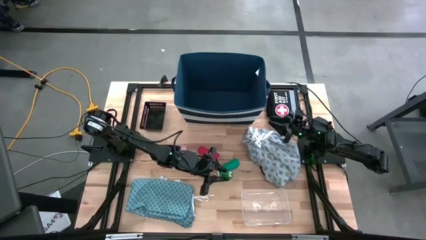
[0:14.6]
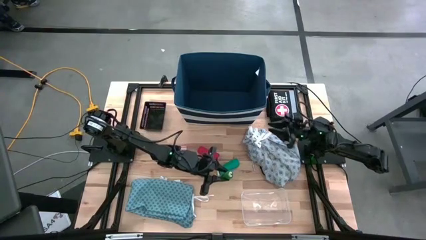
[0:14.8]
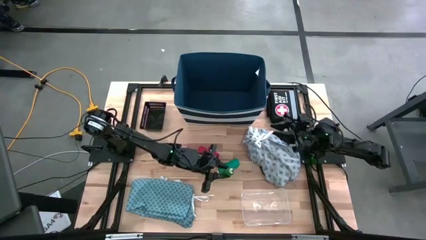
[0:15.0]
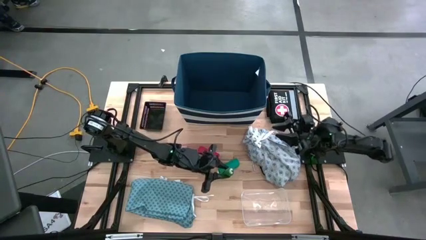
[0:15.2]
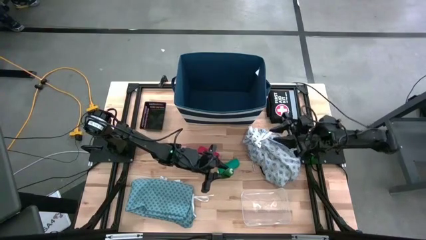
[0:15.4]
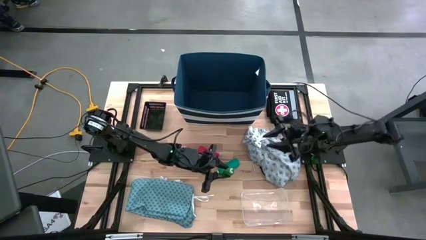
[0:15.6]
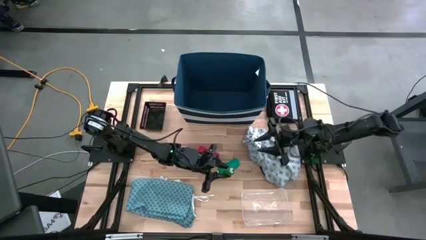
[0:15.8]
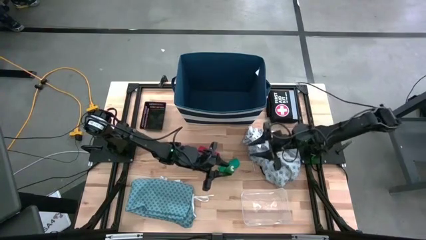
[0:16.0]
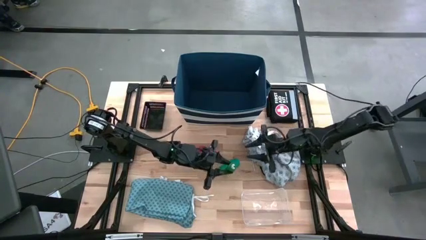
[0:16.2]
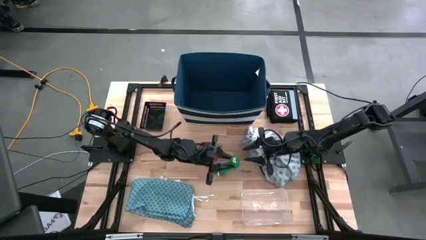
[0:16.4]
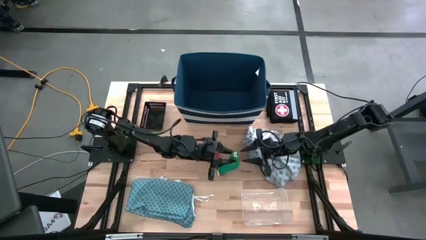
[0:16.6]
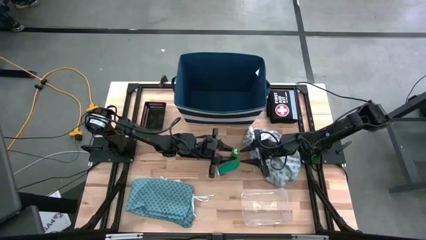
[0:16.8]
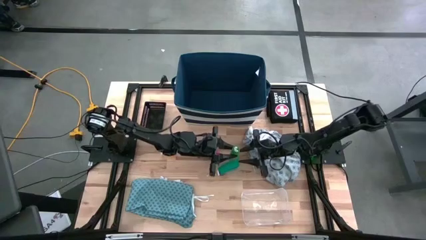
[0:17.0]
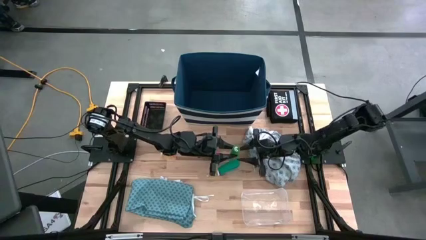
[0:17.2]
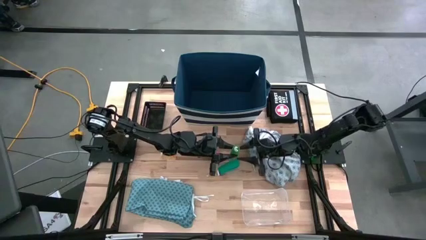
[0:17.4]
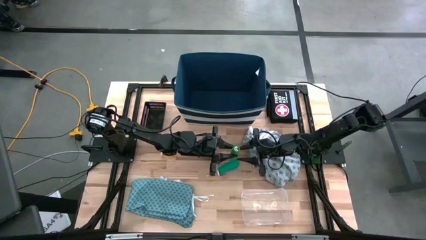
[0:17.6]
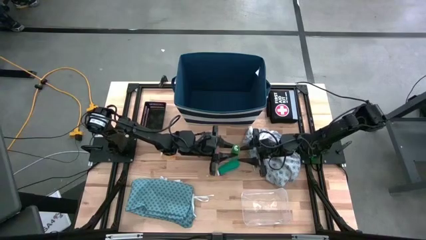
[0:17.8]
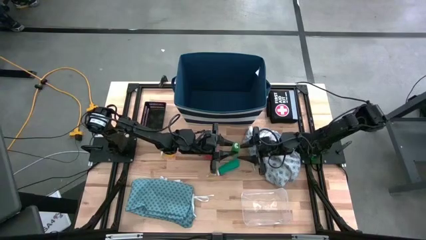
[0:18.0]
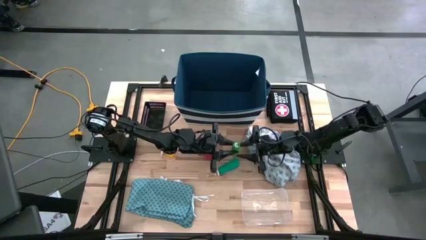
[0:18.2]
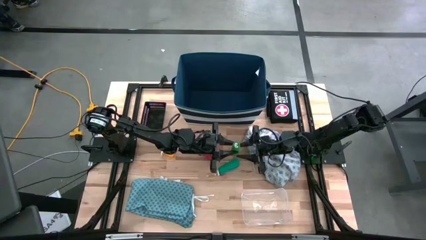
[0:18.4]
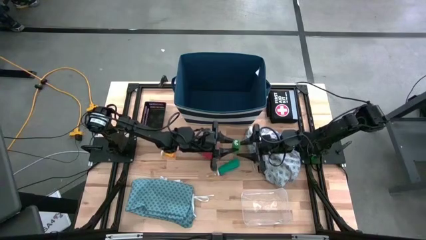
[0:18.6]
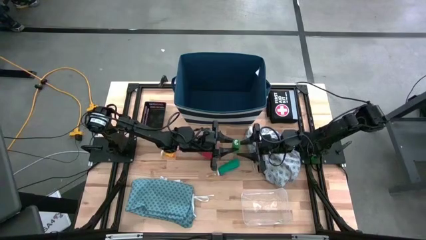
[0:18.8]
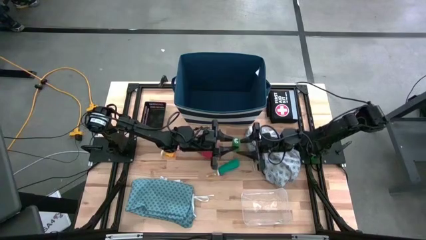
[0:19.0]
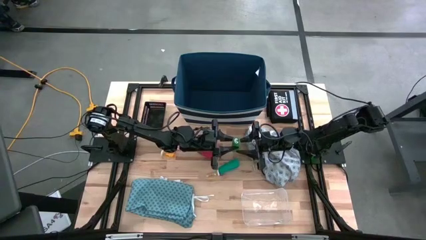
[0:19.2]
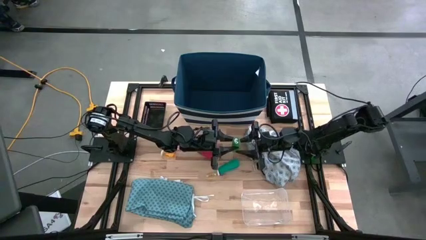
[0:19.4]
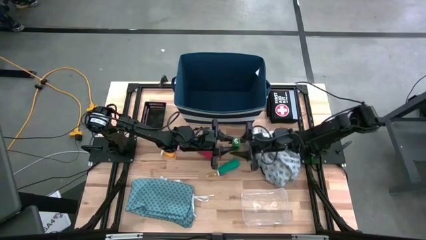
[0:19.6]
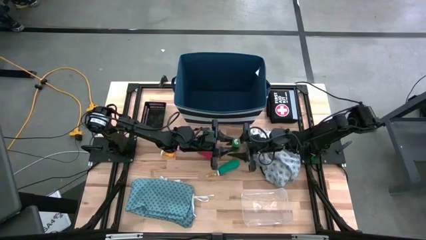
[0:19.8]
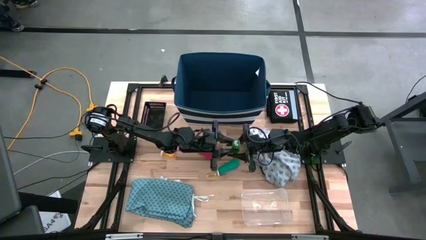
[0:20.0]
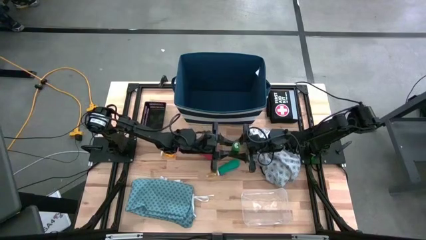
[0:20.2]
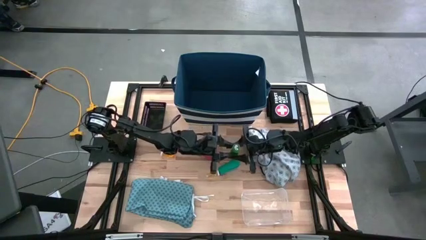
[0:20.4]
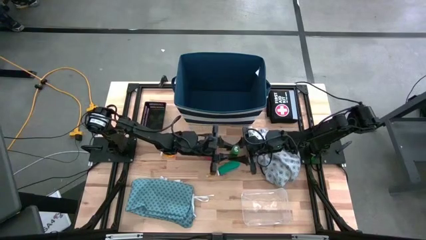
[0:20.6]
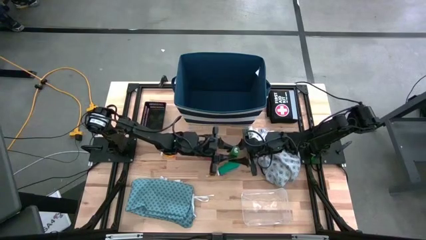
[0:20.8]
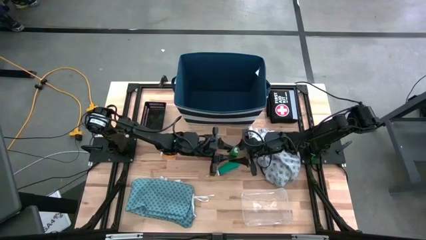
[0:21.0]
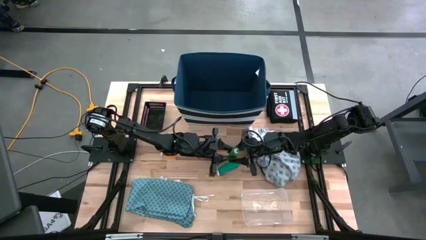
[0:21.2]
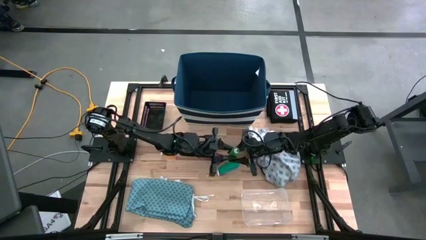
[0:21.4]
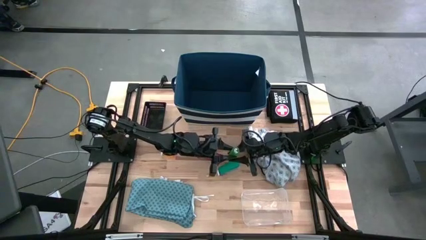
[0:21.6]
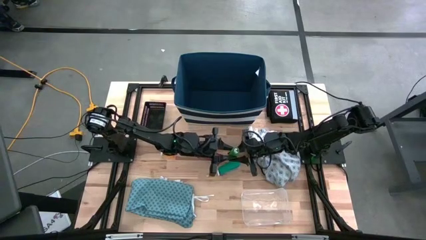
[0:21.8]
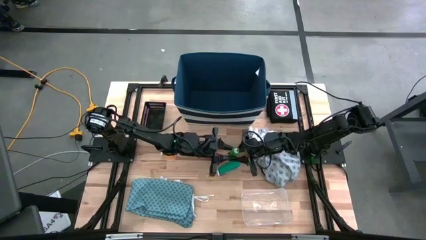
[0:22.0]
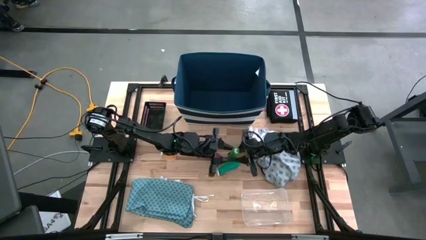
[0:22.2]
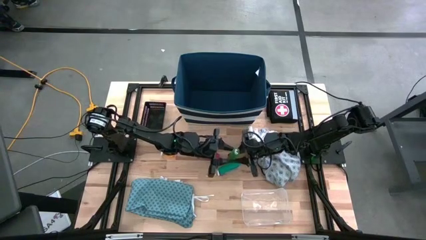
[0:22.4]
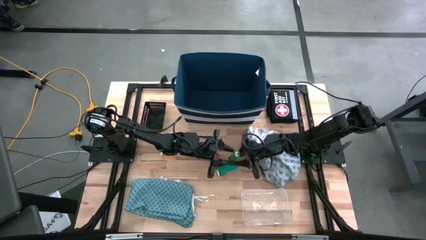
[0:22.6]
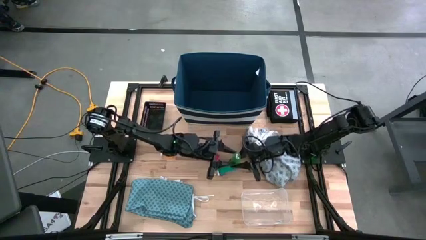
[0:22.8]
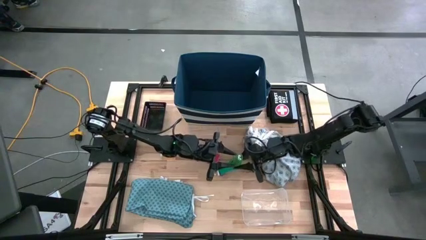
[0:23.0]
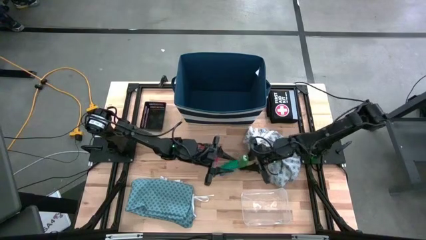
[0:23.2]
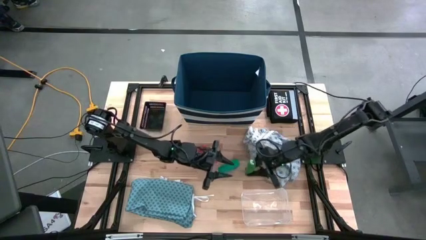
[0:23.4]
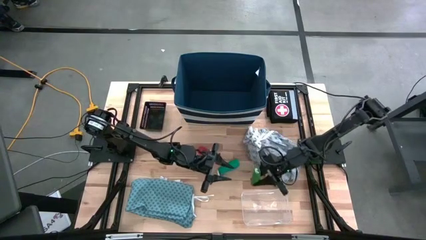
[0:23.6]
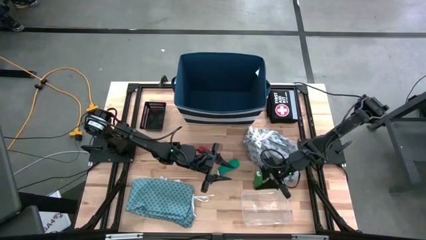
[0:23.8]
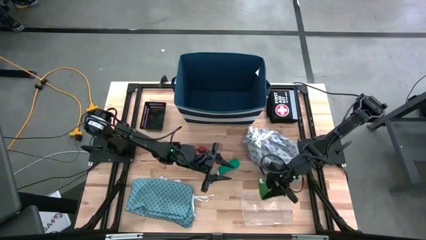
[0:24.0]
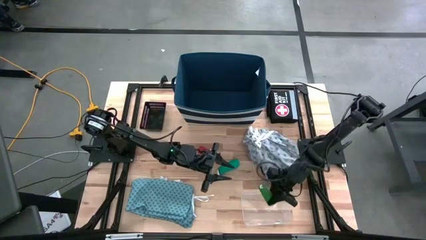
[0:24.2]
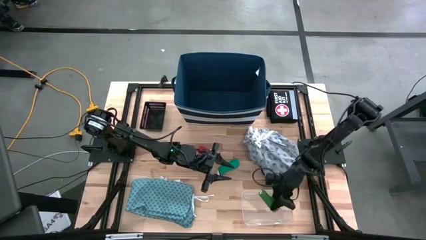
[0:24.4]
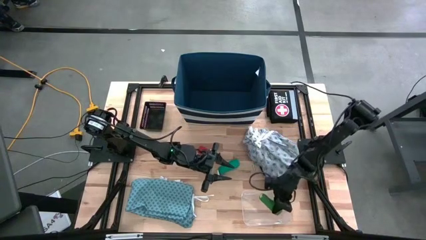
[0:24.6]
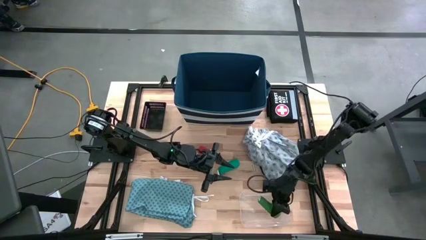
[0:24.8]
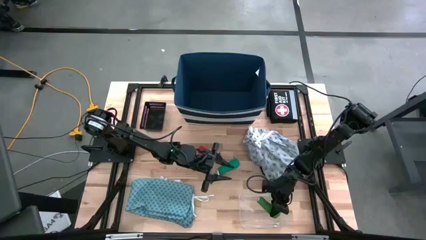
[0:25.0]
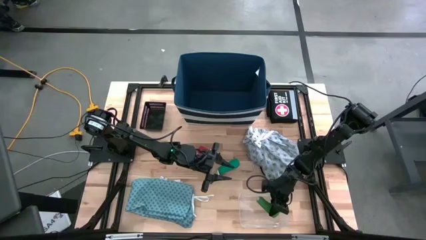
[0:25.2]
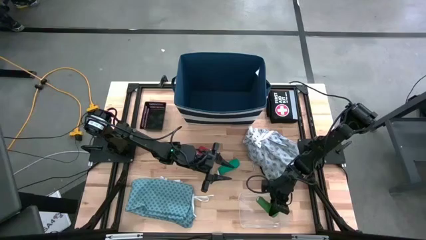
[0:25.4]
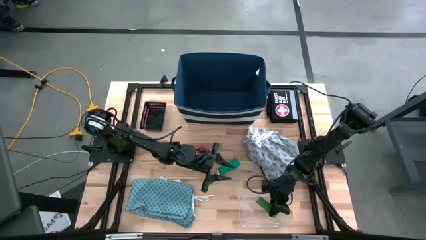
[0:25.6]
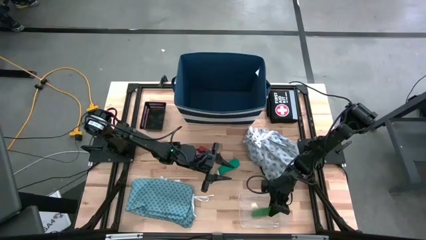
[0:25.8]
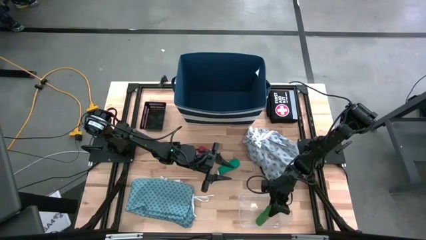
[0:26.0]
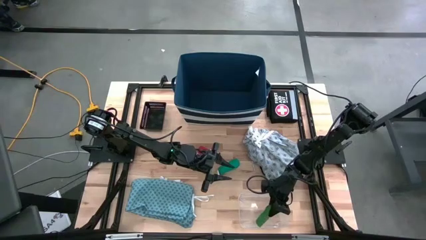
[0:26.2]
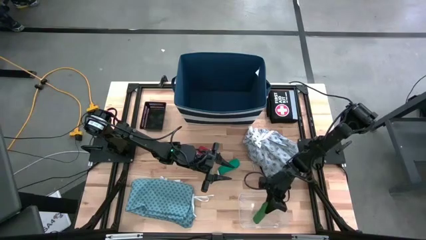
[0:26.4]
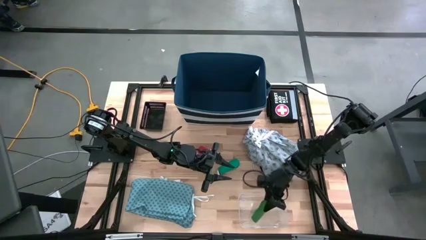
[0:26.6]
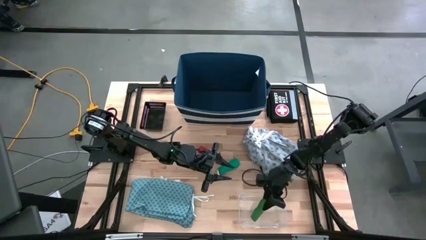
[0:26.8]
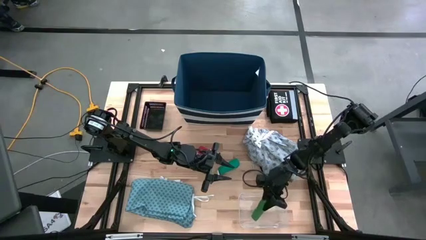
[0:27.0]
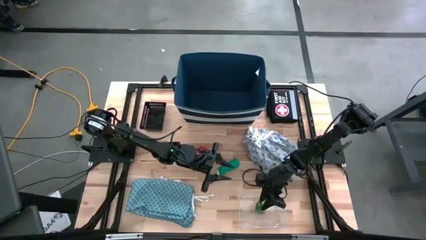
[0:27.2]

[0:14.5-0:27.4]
Task: Pick & Place Medicine items
Put the green bandage into the transparent bin
